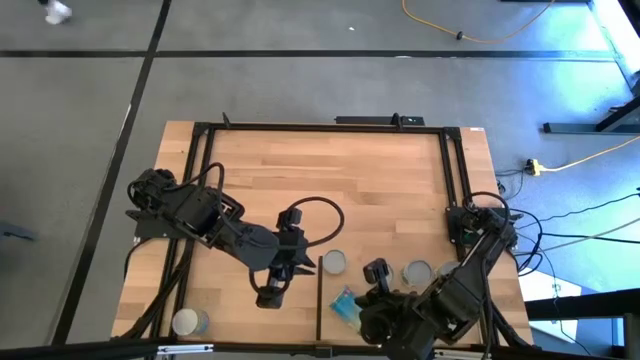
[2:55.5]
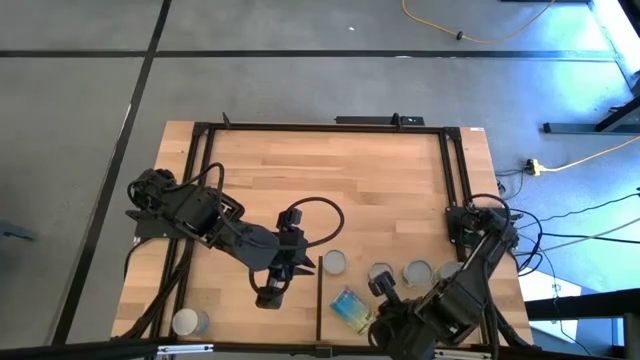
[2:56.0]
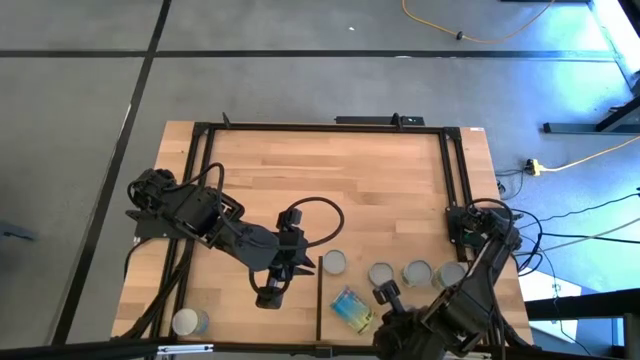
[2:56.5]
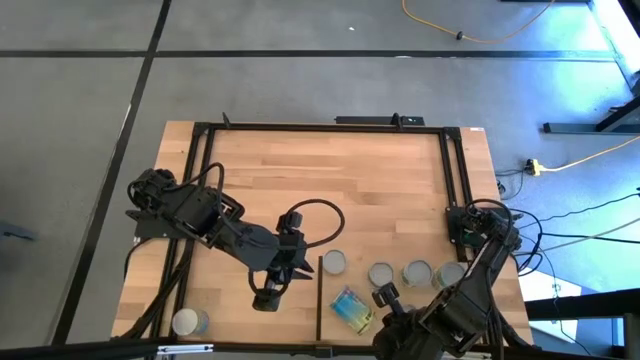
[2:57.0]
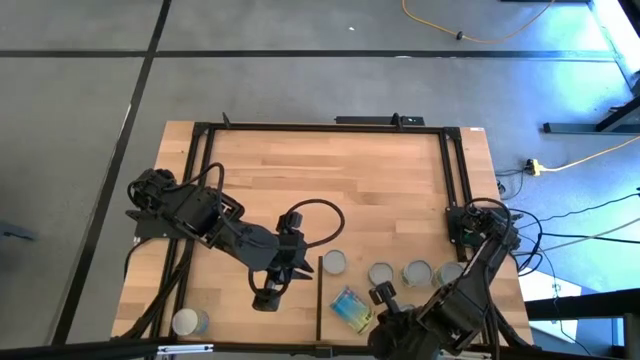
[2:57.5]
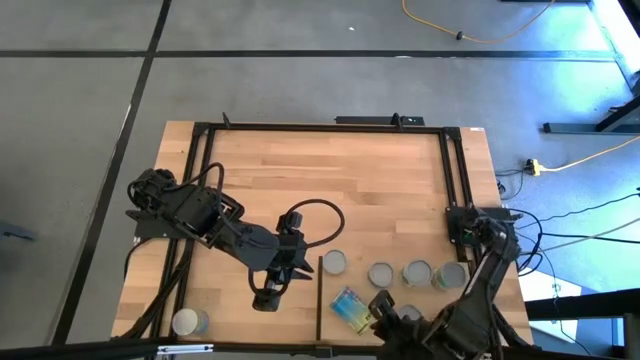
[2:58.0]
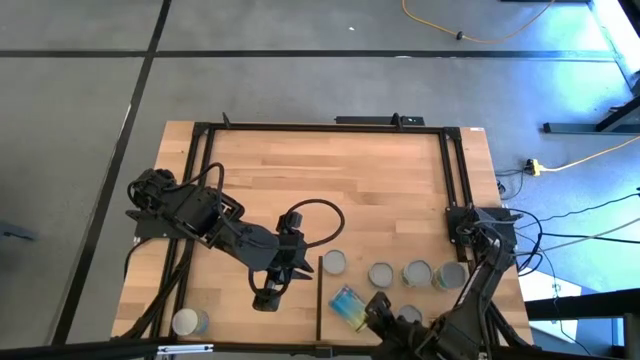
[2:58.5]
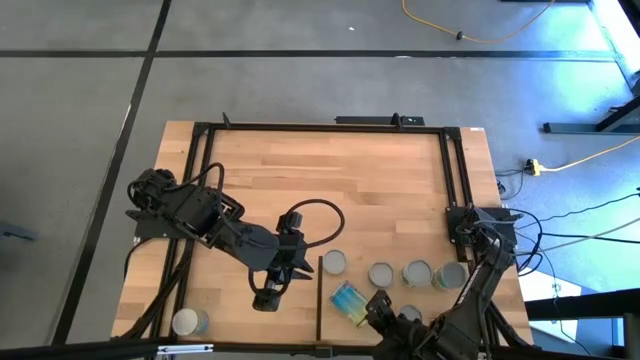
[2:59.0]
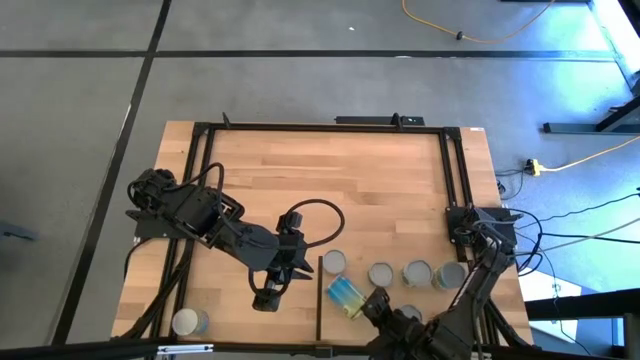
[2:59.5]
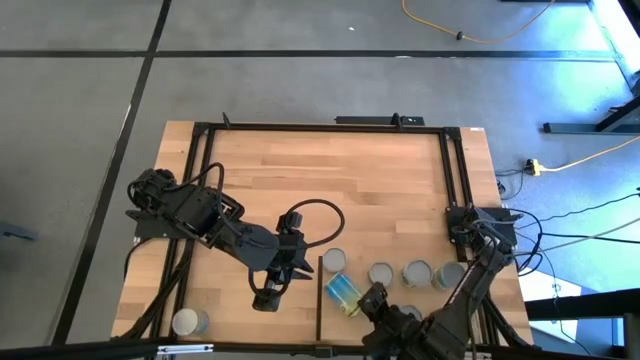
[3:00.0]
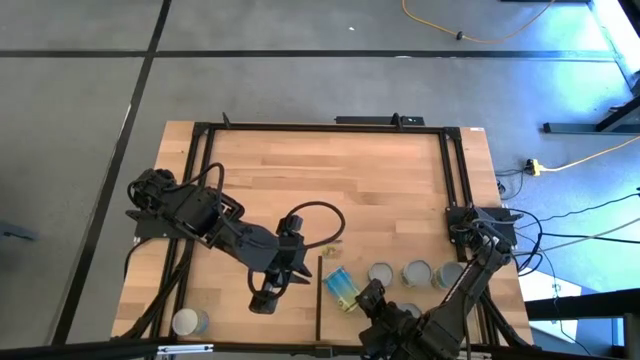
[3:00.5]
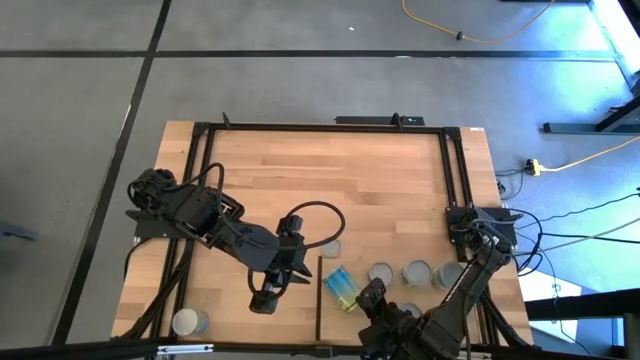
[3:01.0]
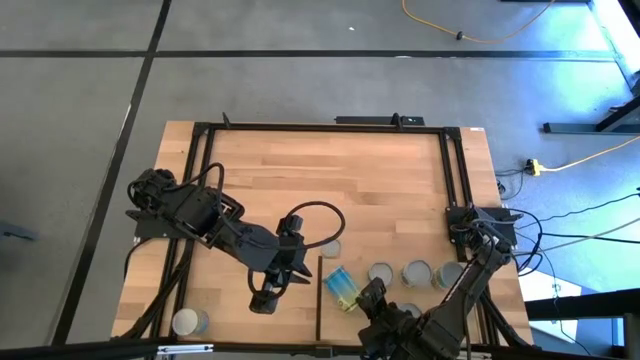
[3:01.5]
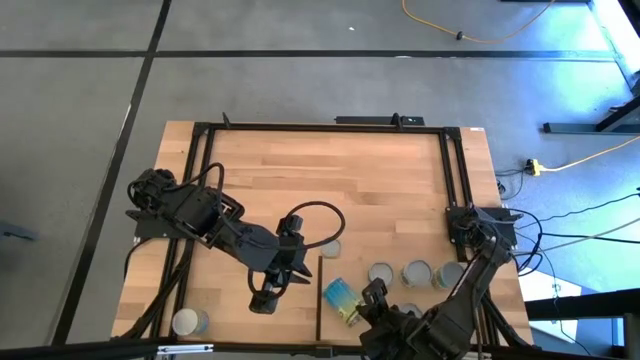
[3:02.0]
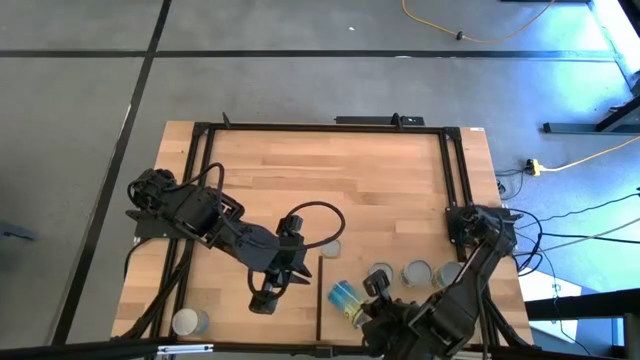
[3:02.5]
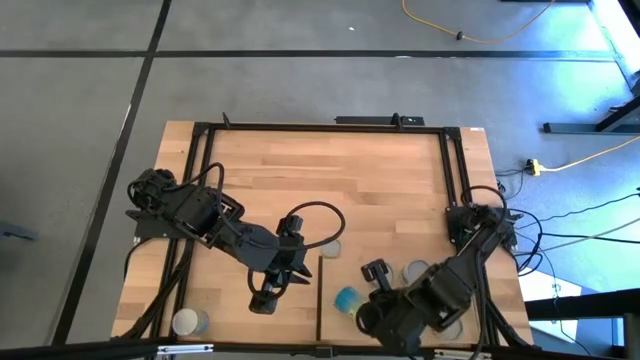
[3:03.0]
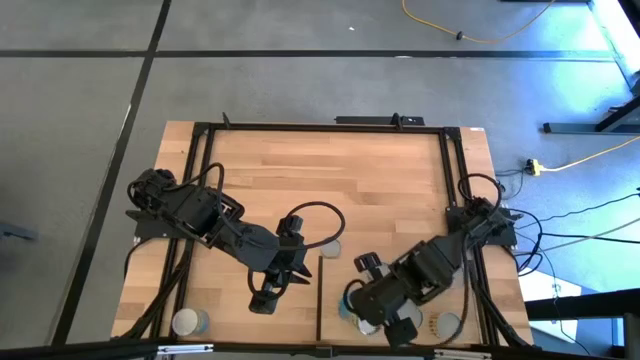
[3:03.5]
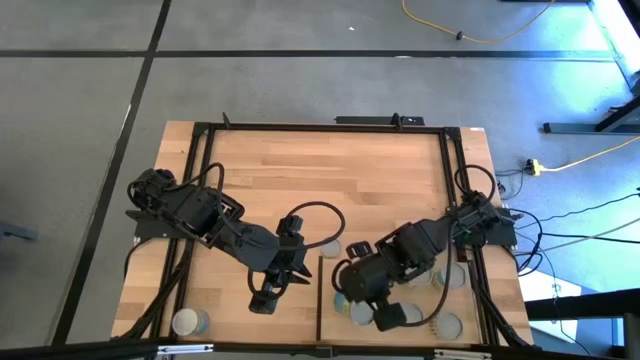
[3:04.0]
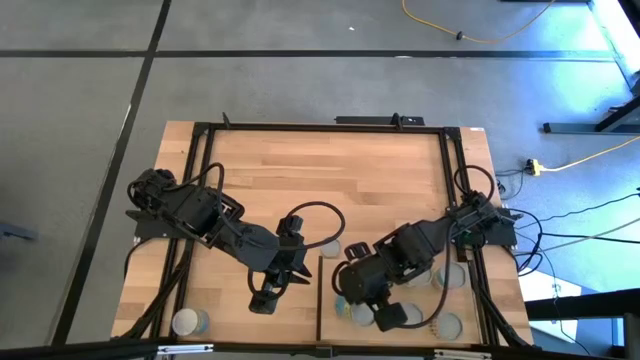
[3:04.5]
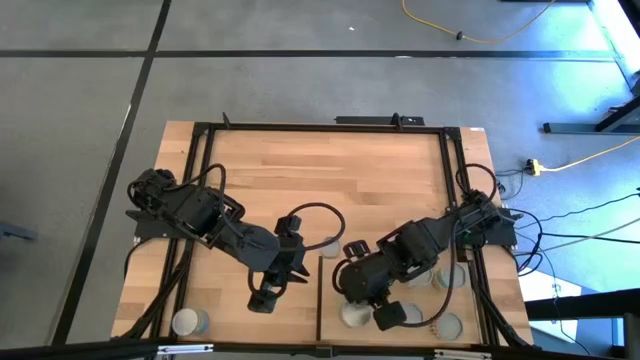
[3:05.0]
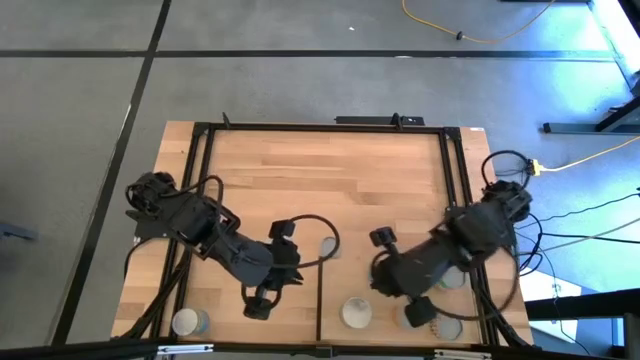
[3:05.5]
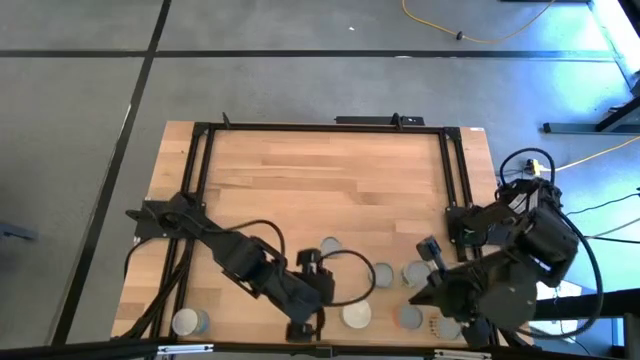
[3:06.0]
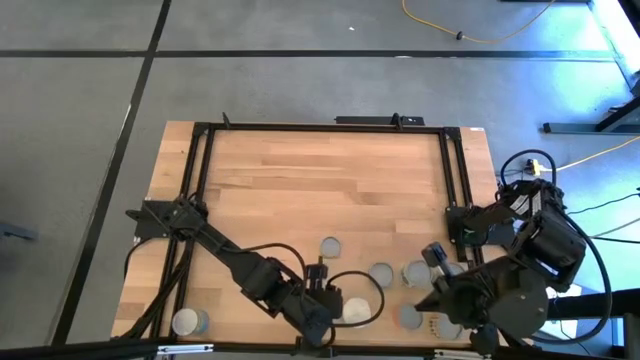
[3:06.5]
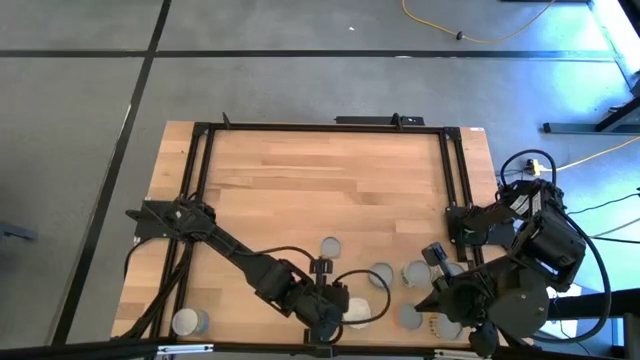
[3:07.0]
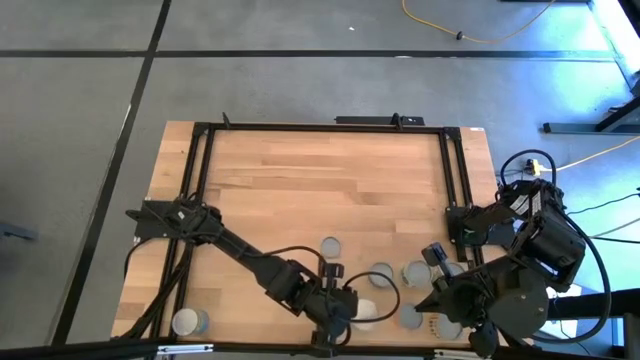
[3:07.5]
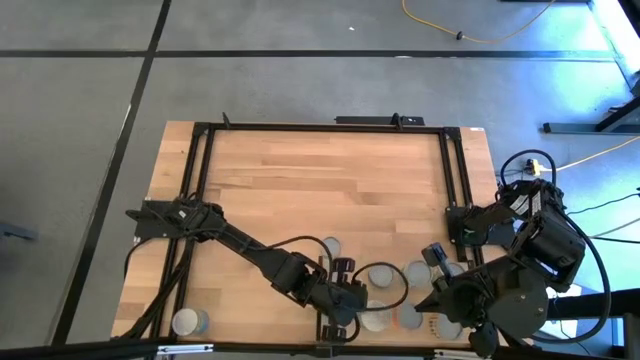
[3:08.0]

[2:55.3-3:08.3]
Task: Pick and place cans onto a shelf
Put the top blue canned cherries on the shelf aligned with the other green tuna can

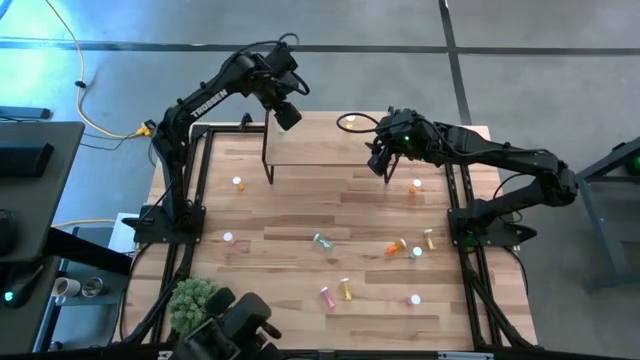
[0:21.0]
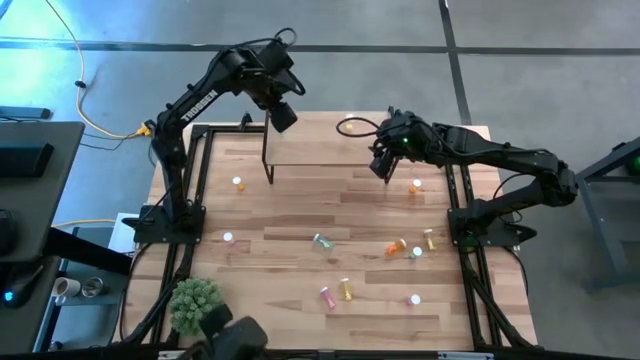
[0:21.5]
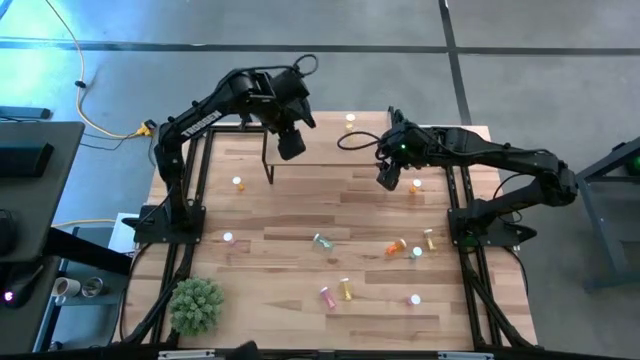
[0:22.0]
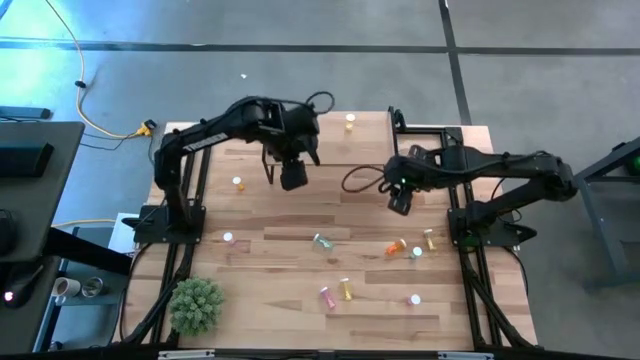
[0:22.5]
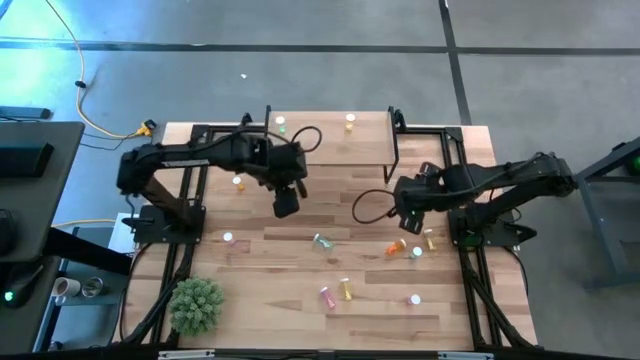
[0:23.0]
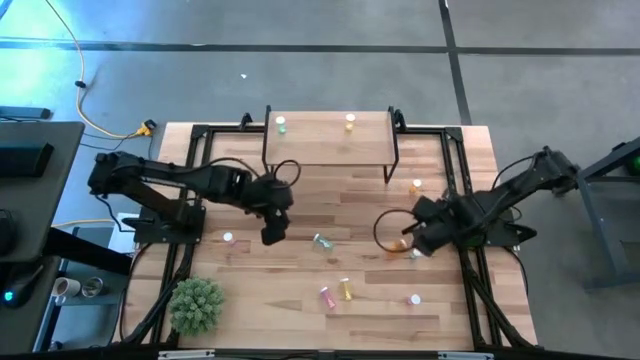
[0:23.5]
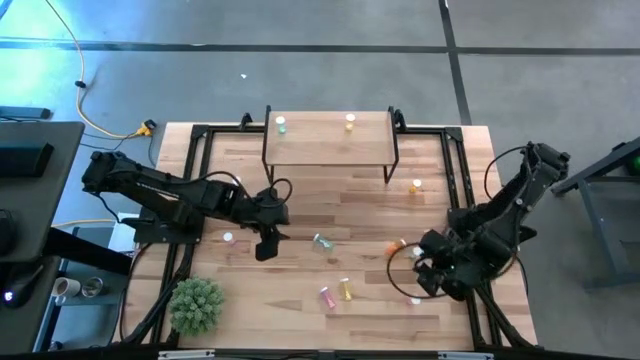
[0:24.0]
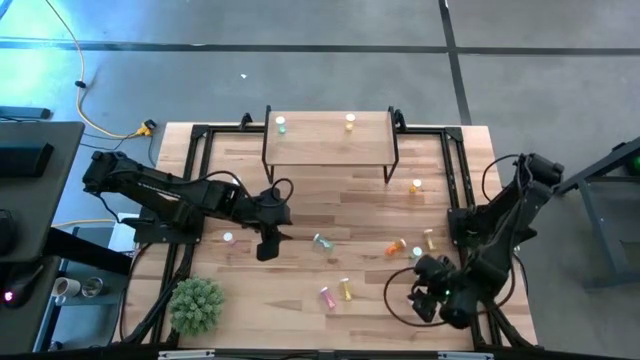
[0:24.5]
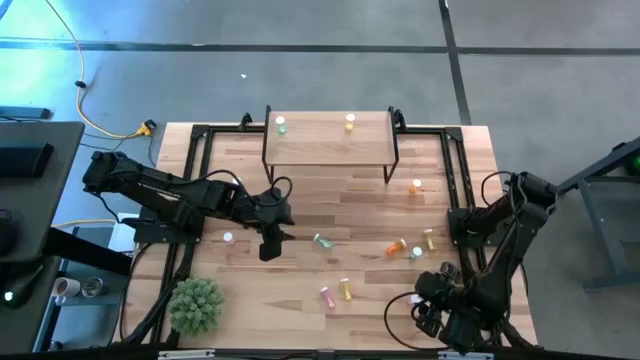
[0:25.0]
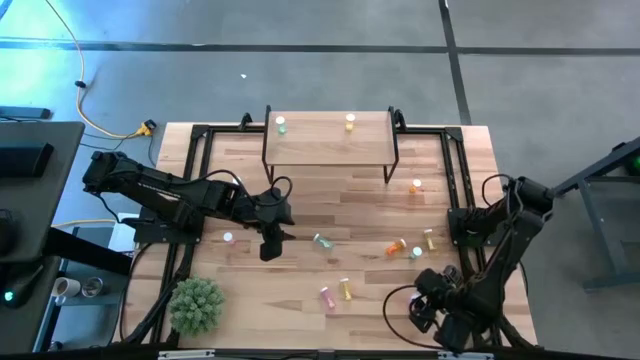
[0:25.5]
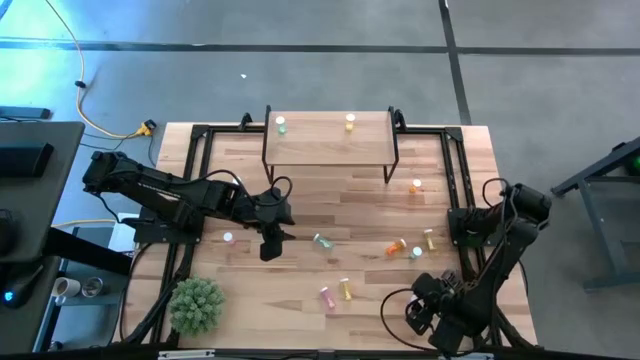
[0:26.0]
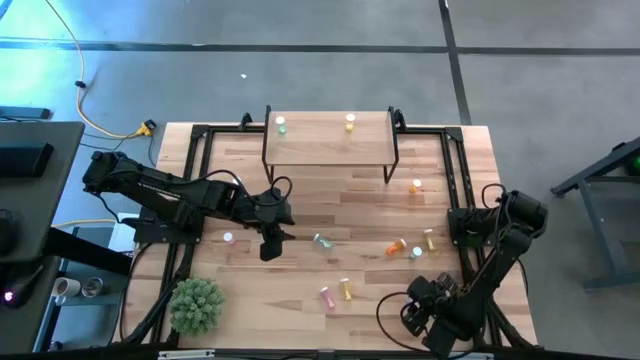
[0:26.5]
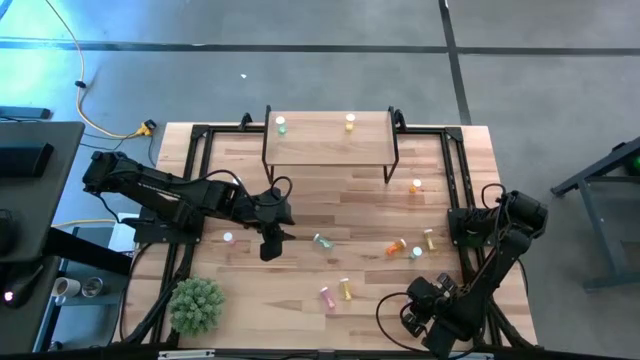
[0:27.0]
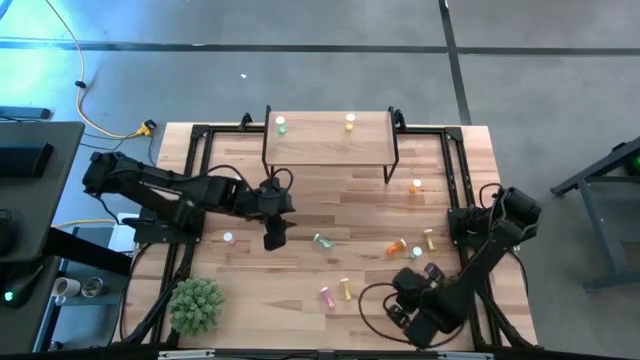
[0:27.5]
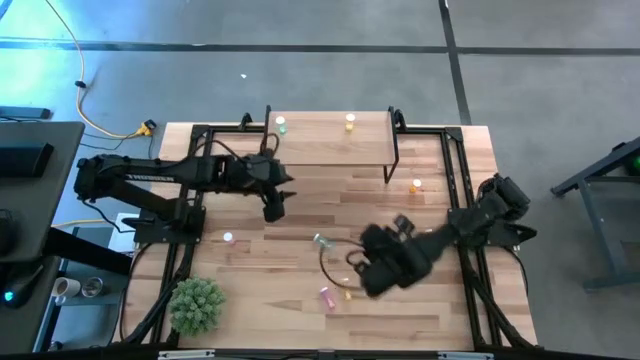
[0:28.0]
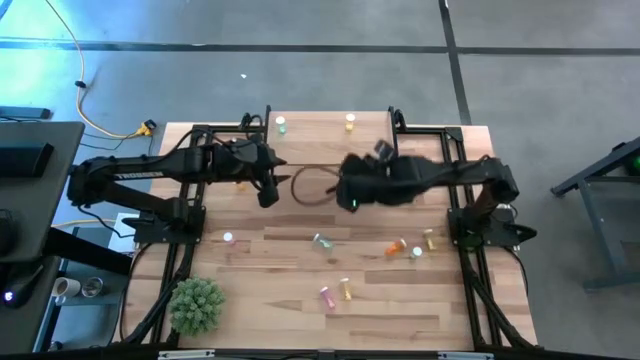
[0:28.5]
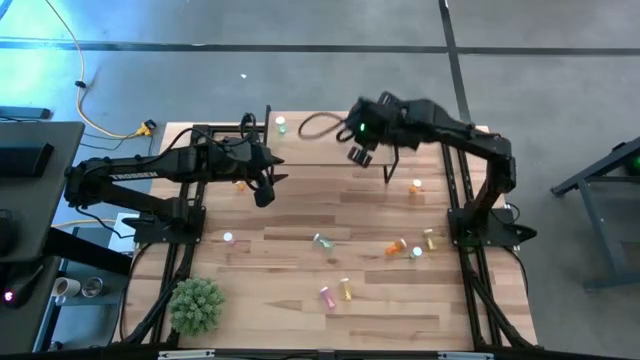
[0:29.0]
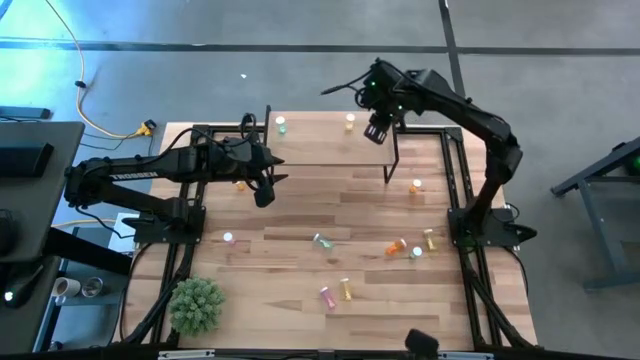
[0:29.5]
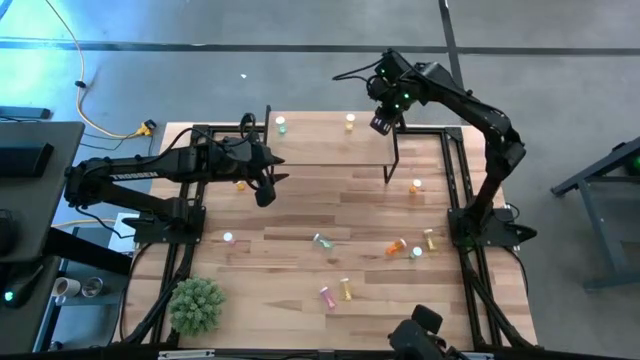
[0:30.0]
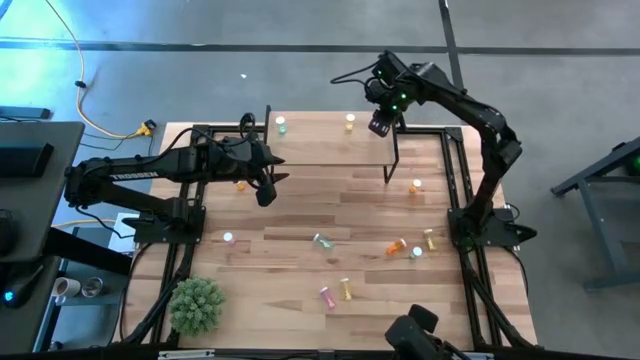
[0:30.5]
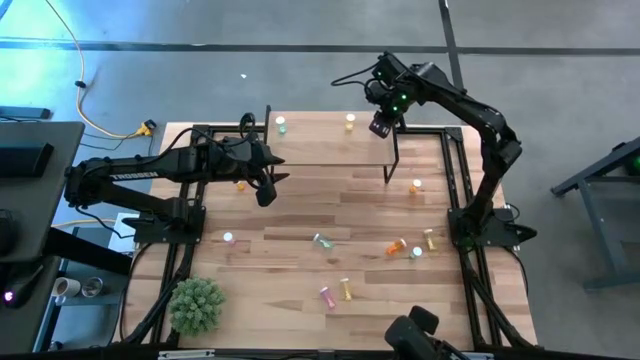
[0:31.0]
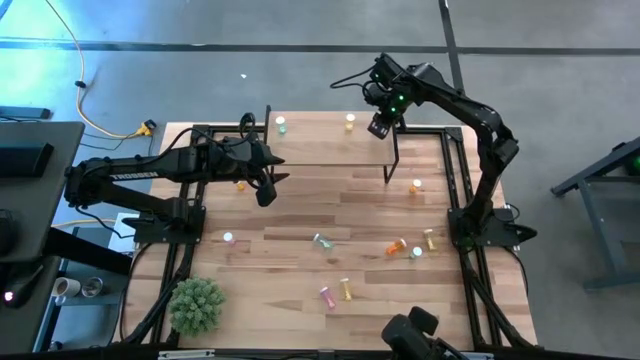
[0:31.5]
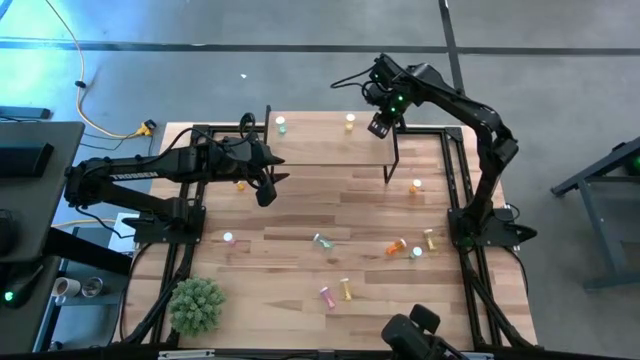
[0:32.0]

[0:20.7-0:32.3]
Task: Pick and place medicine bottles onto shelf by color
Put the bottom right violet pill bottle on the shelf
